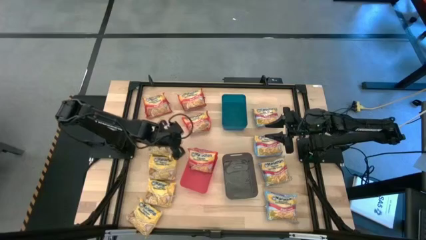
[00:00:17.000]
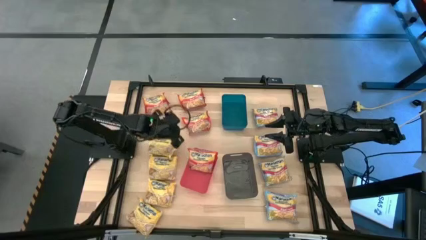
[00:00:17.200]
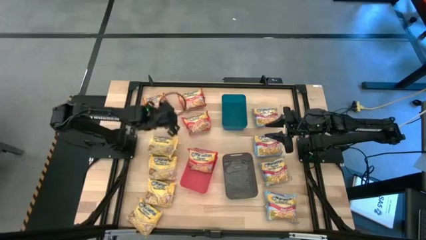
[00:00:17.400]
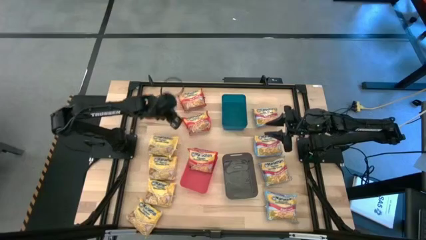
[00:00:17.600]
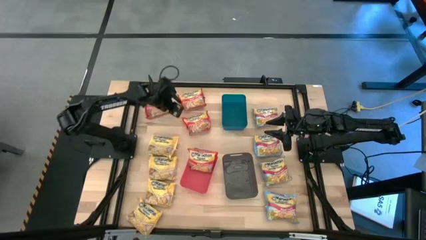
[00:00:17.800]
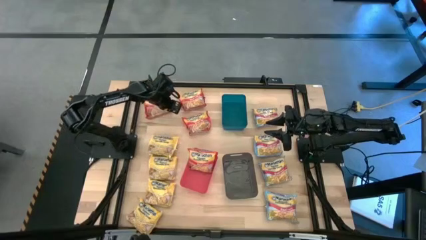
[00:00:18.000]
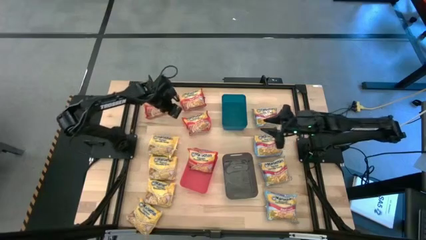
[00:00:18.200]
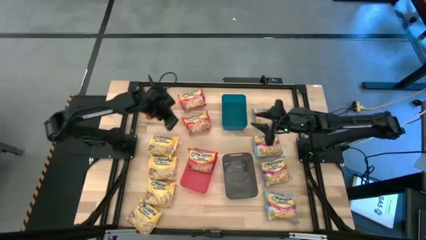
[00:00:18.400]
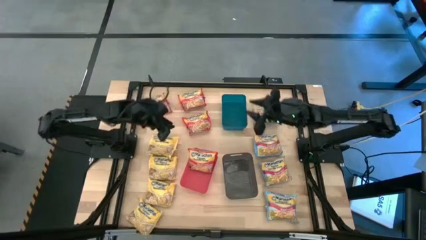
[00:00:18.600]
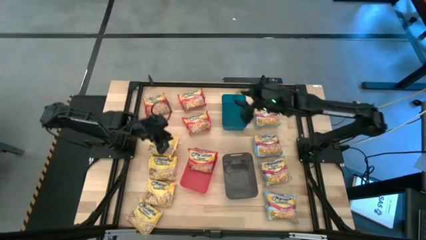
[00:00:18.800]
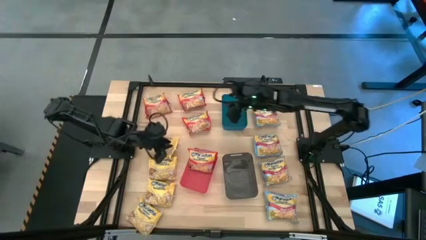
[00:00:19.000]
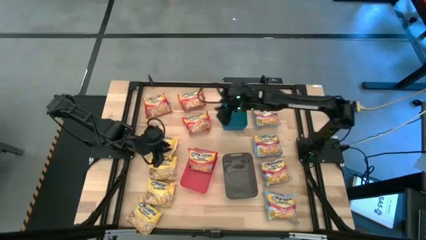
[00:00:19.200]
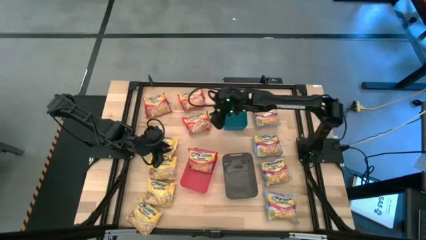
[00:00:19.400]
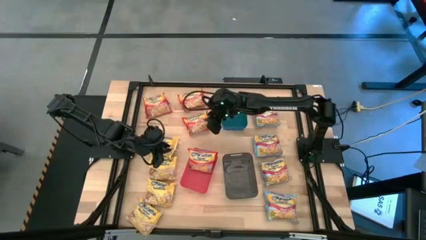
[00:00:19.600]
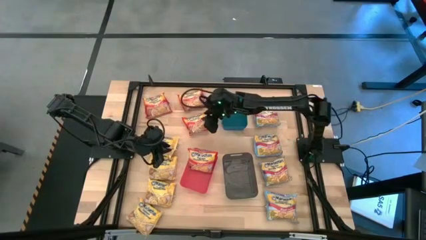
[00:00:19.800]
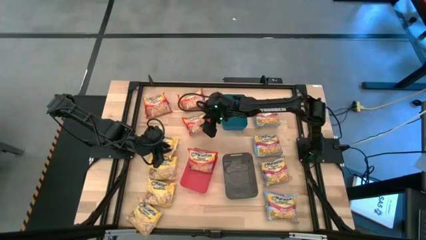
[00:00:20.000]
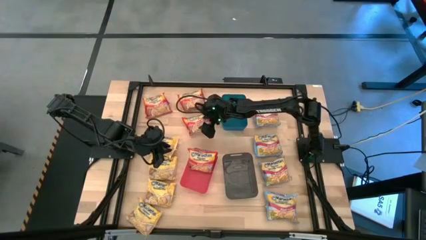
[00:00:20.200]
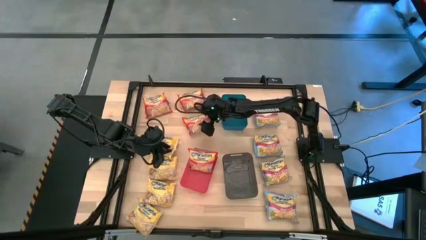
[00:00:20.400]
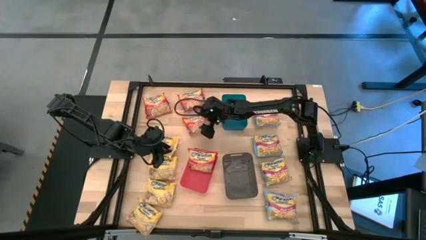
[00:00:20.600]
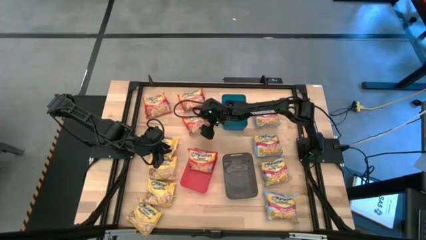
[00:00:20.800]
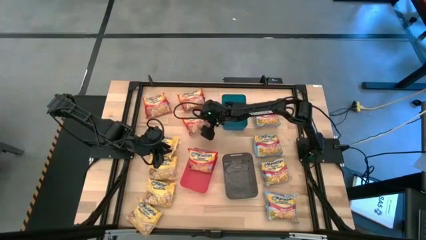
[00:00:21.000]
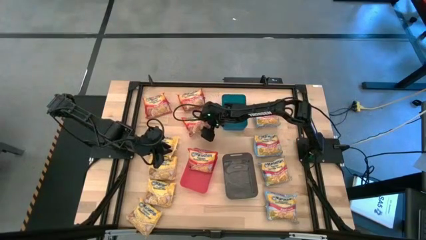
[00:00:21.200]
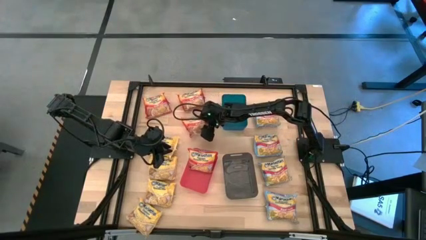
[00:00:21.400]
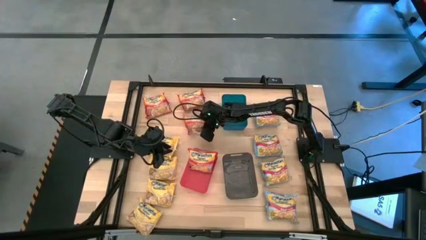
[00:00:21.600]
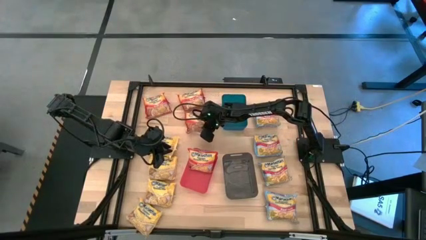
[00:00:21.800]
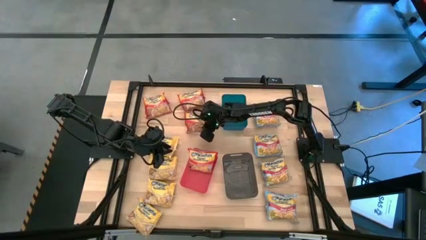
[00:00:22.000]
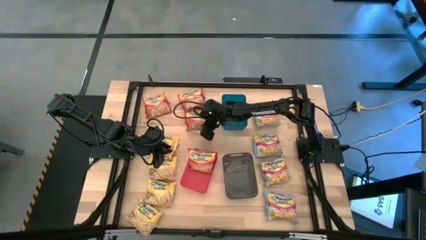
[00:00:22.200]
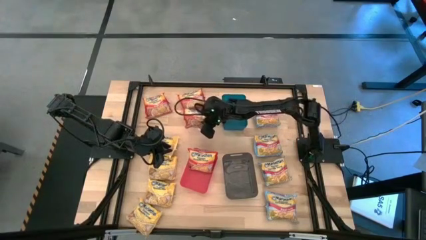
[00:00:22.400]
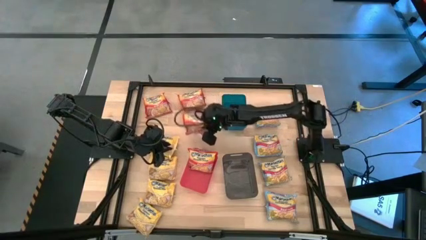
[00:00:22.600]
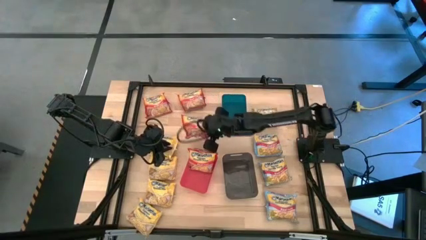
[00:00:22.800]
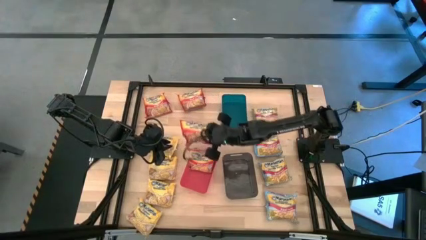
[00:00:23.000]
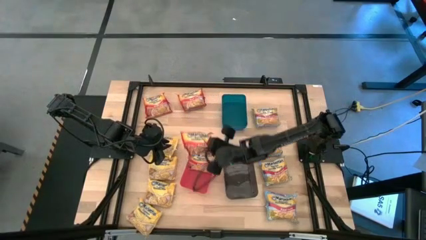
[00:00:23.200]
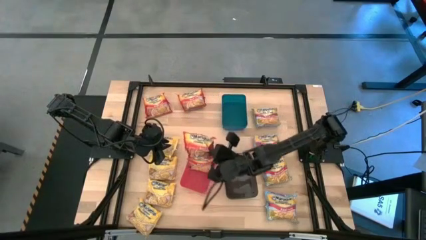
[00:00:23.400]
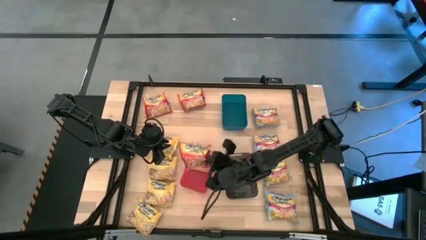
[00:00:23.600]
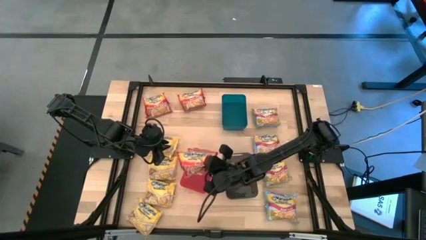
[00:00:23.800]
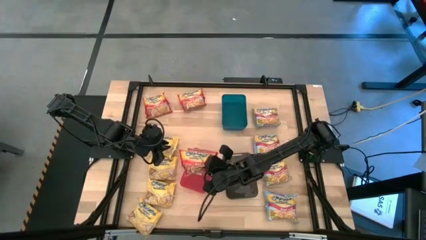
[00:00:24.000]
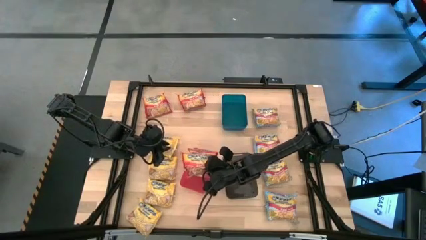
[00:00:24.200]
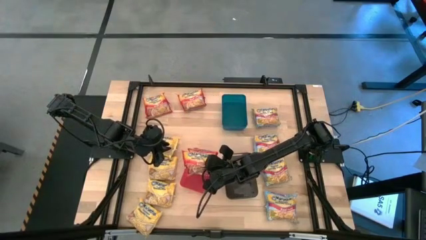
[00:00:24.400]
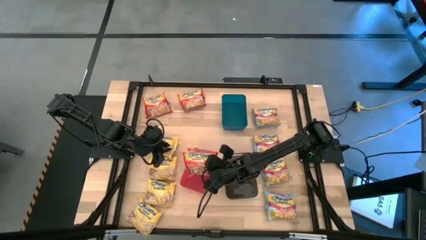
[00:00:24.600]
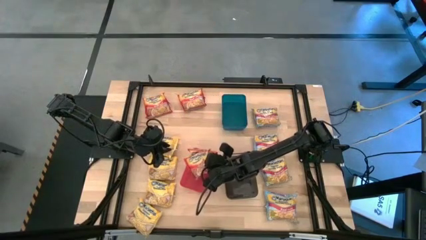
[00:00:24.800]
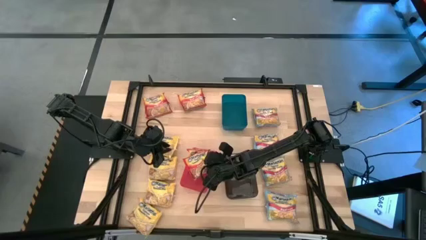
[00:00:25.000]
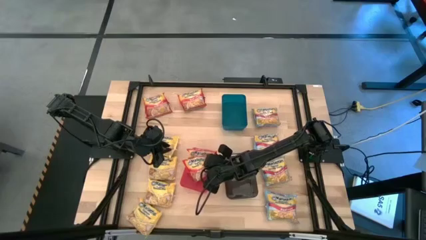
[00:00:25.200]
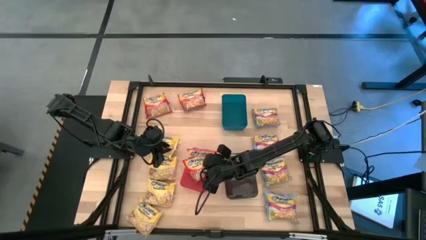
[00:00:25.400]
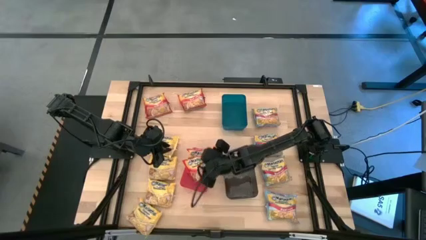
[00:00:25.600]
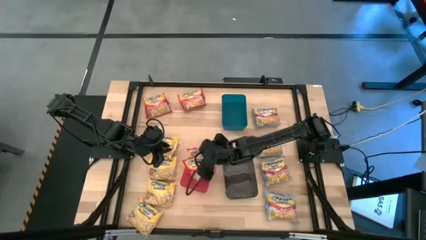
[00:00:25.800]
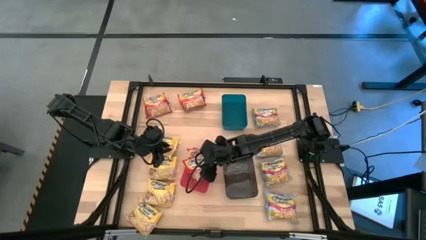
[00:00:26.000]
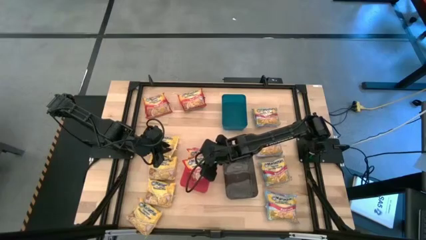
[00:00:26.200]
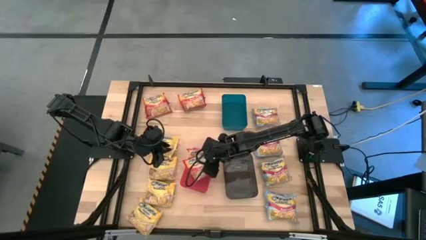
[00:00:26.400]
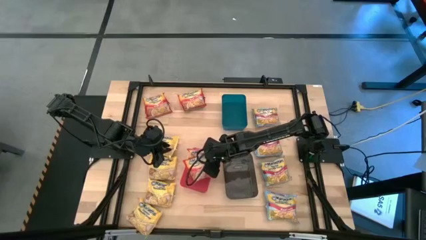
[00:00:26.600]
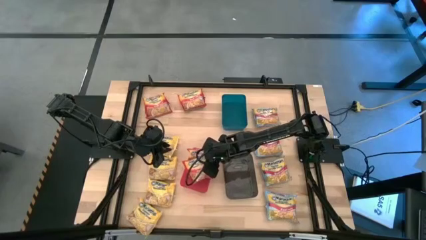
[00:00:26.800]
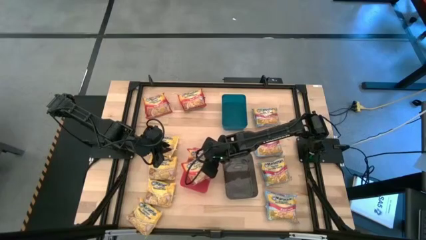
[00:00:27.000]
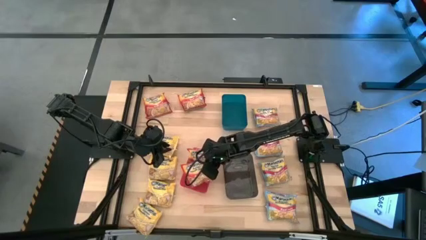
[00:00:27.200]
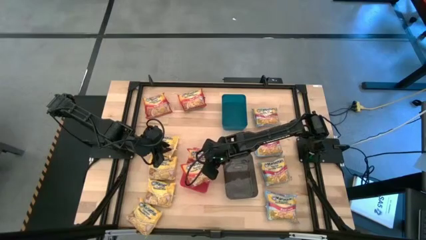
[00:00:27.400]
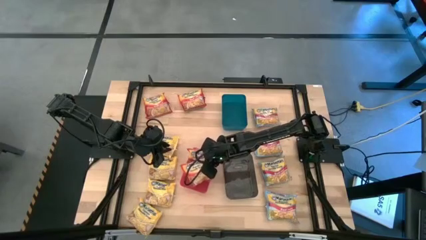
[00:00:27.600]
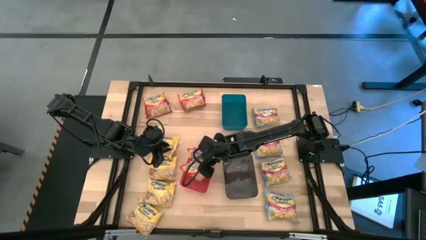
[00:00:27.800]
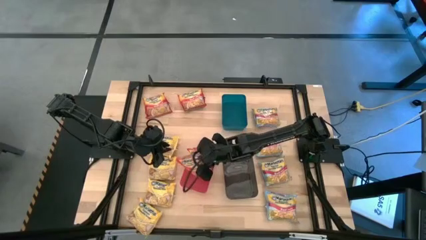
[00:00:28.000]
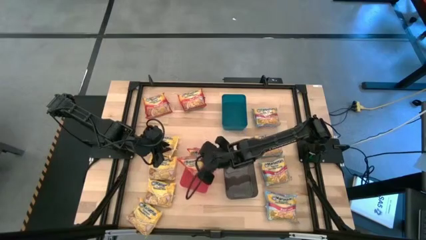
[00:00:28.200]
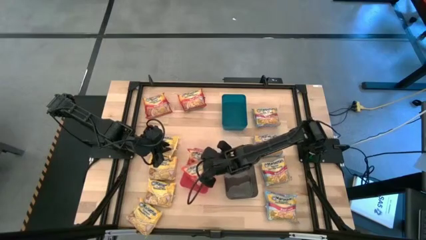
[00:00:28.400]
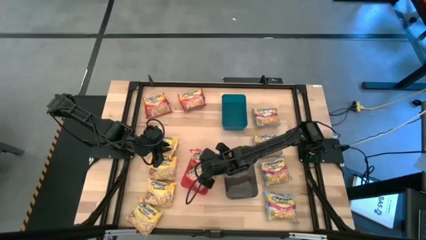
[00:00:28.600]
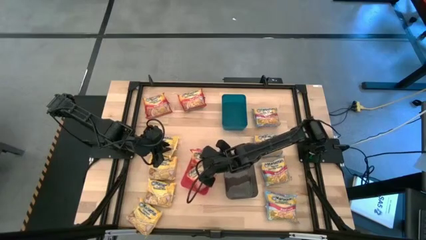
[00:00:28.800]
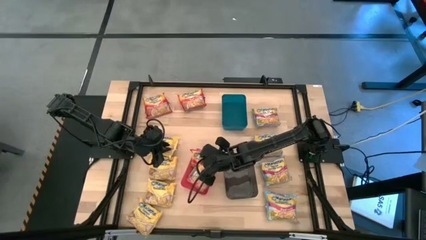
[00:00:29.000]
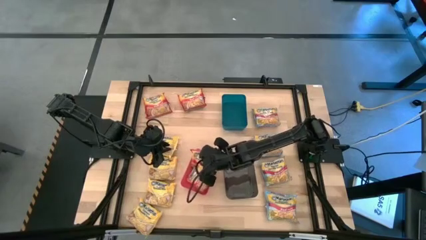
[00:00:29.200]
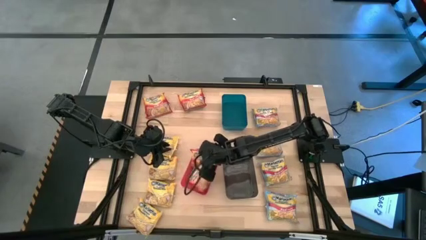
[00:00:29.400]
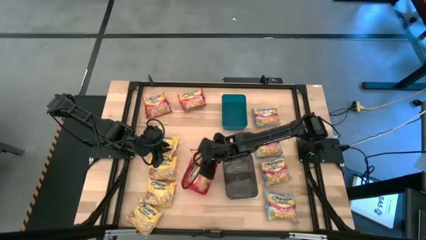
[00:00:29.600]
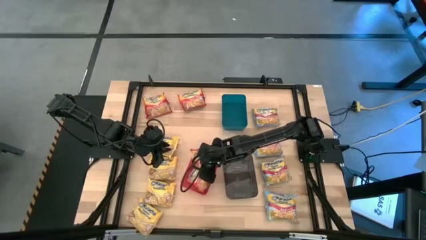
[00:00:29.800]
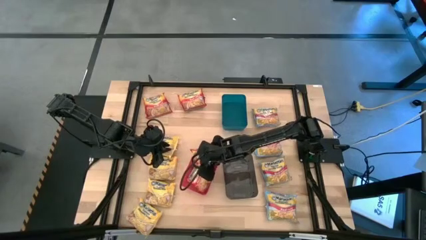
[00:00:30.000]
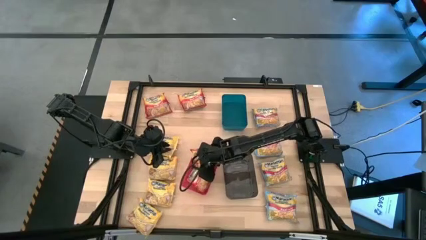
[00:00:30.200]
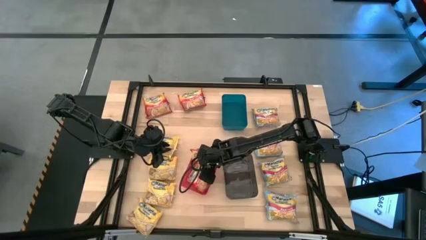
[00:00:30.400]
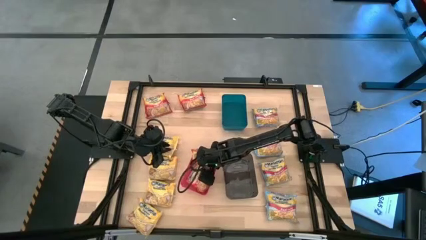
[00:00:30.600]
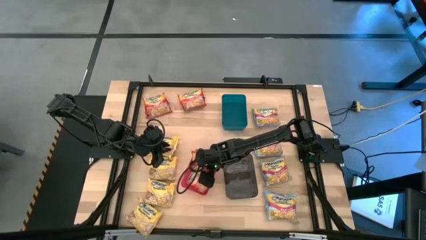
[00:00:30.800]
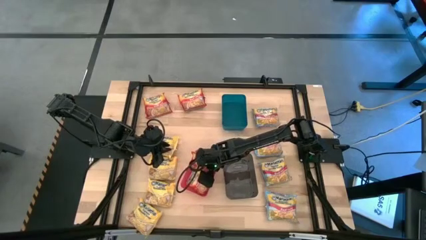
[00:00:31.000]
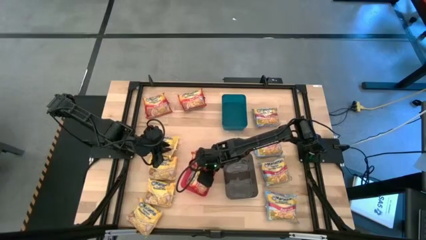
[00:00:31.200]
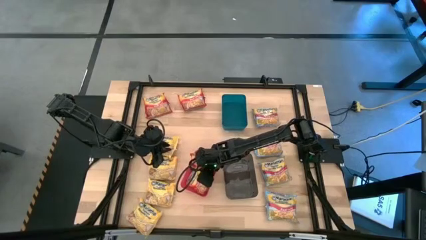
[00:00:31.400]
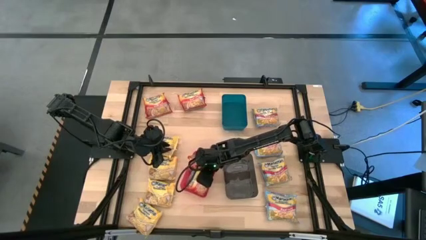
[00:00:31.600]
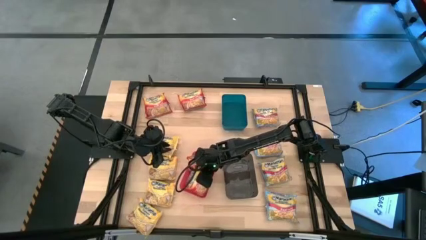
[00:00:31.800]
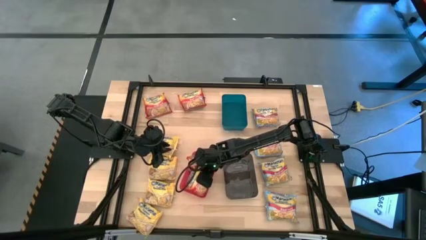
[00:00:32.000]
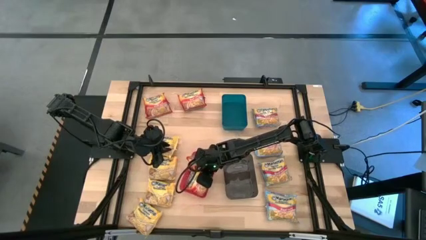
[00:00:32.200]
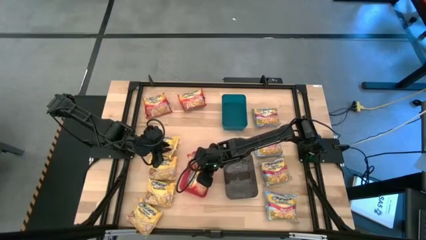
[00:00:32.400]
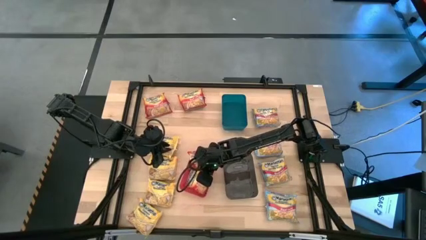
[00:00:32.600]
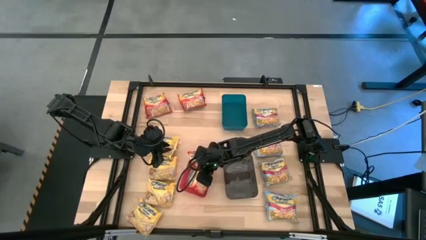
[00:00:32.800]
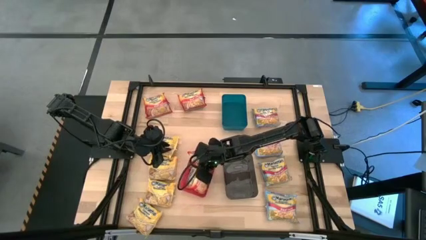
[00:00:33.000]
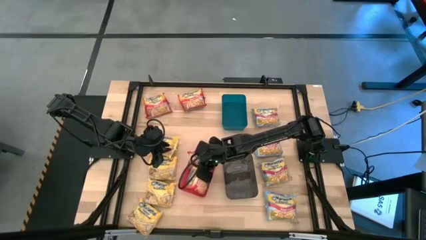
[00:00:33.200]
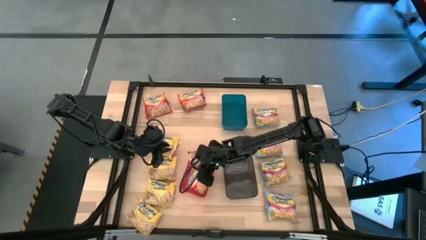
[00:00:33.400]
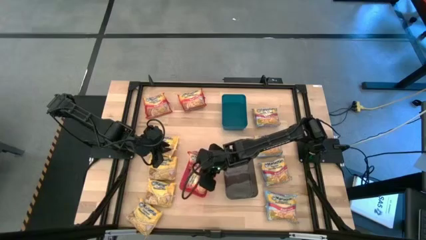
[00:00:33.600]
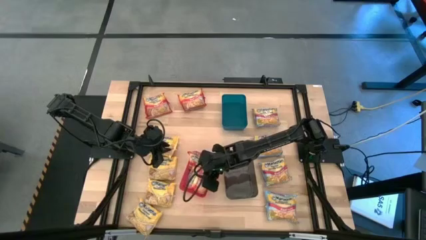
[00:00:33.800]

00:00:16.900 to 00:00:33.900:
Task: Sort Maruchan noodles
Put the red bag into the red bin
